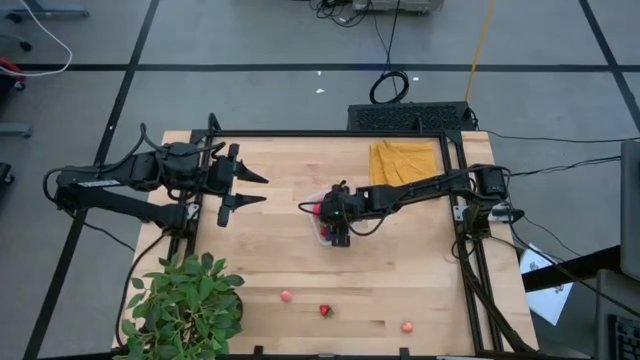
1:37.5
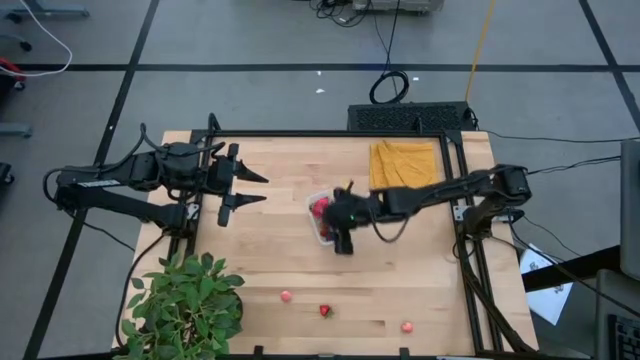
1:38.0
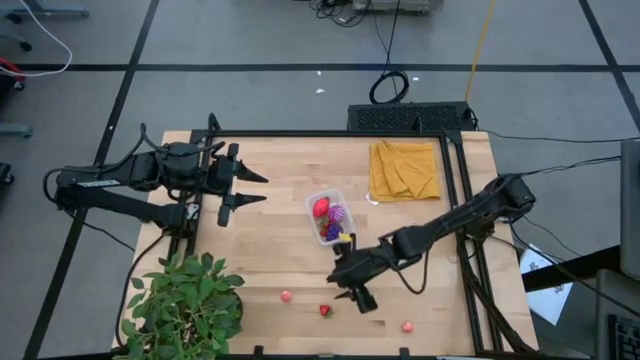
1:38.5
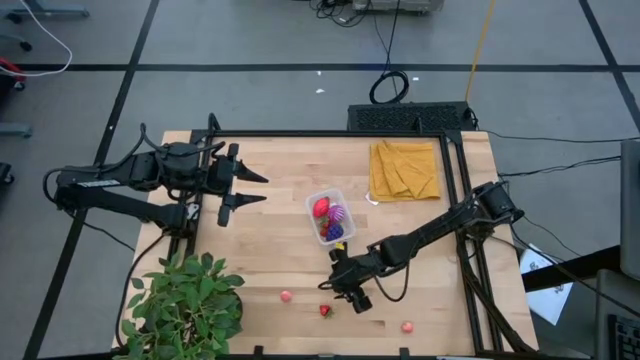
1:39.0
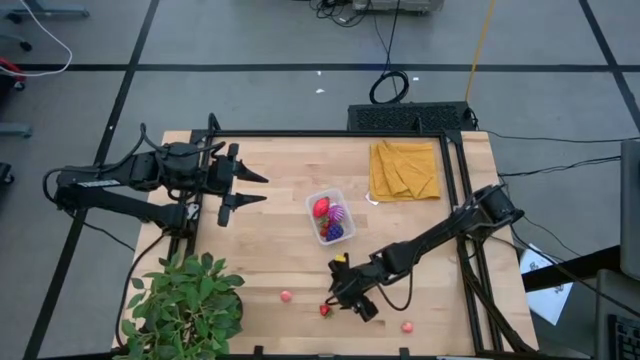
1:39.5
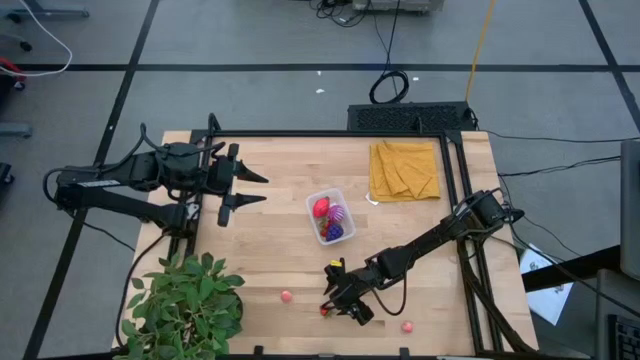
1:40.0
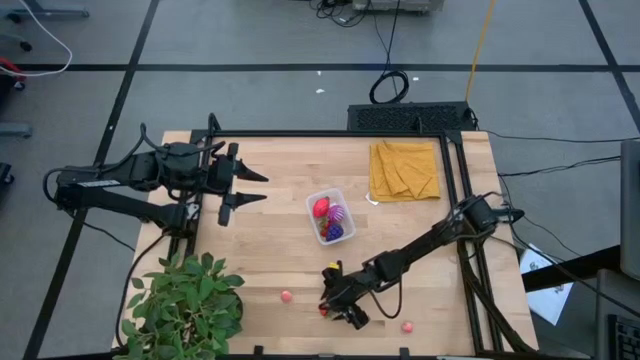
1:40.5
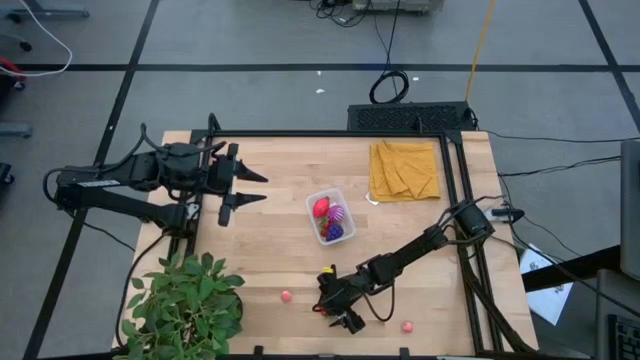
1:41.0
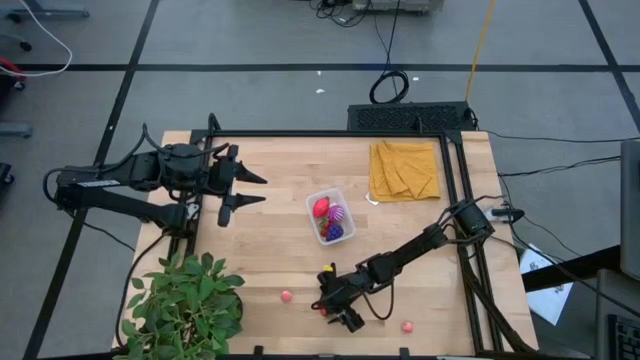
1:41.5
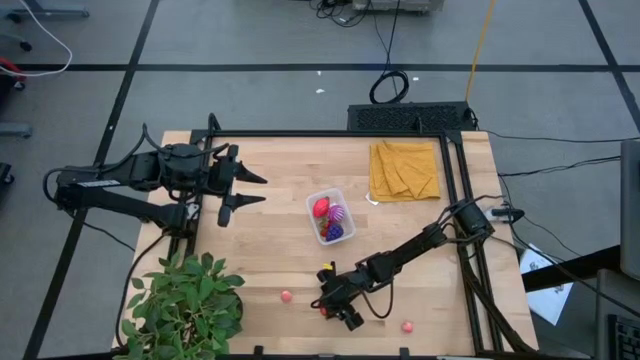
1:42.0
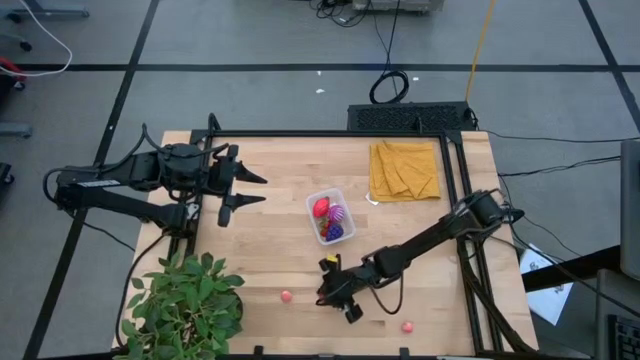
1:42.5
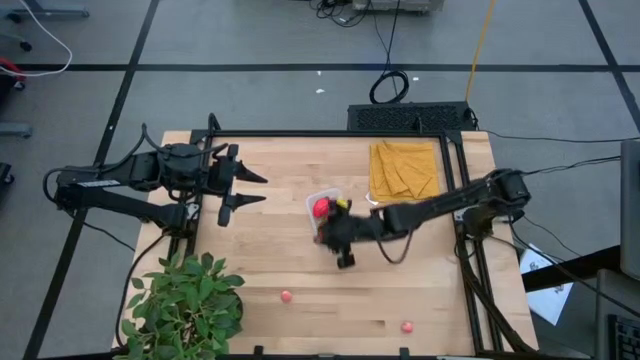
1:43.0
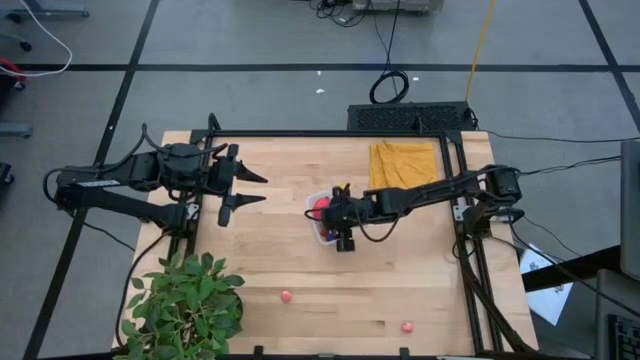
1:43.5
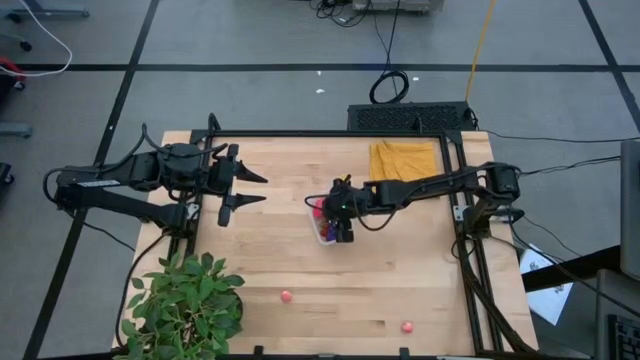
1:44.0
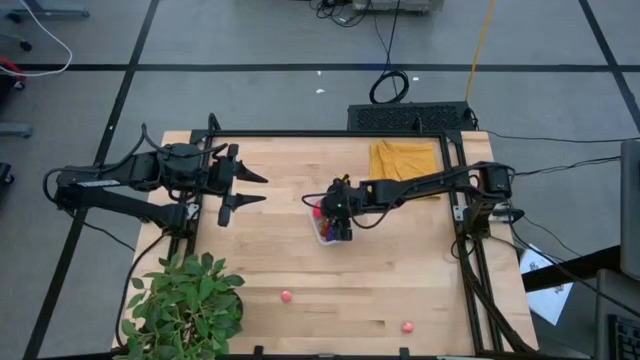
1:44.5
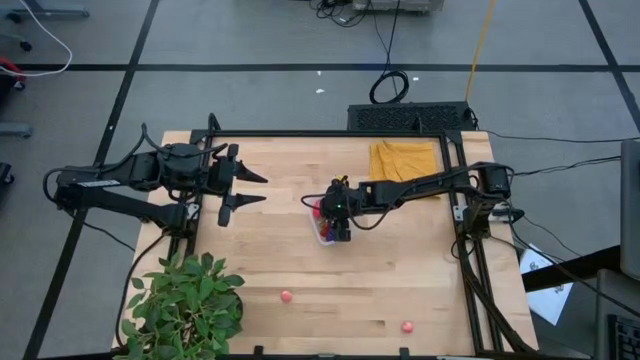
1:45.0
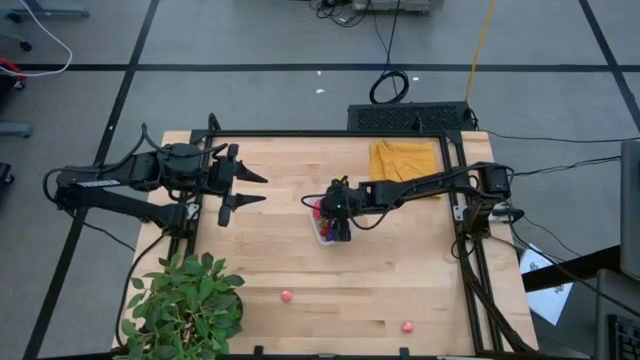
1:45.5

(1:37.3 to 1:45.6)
Task: Pick and placing Produce into tupperware
Put the red strawberry into the transparent container

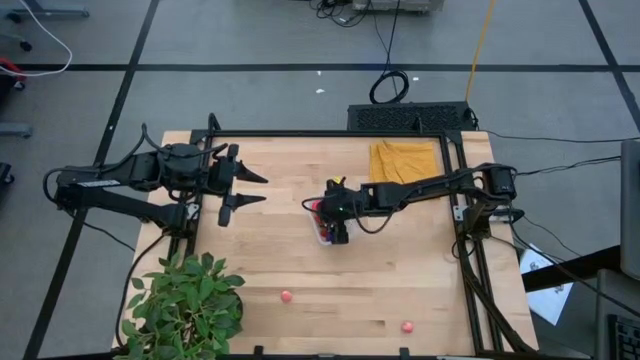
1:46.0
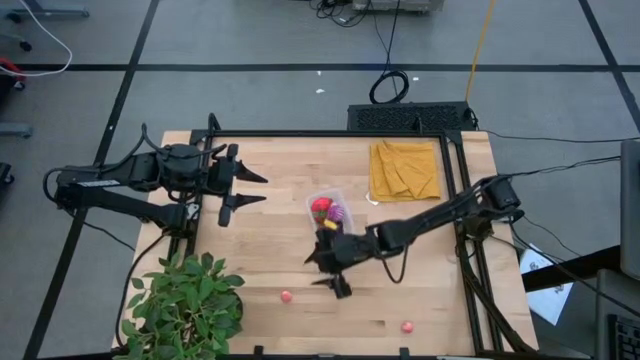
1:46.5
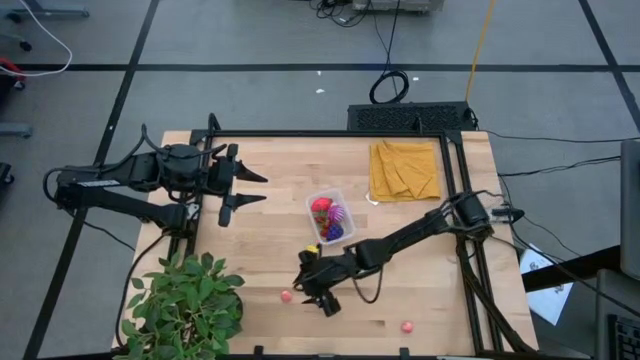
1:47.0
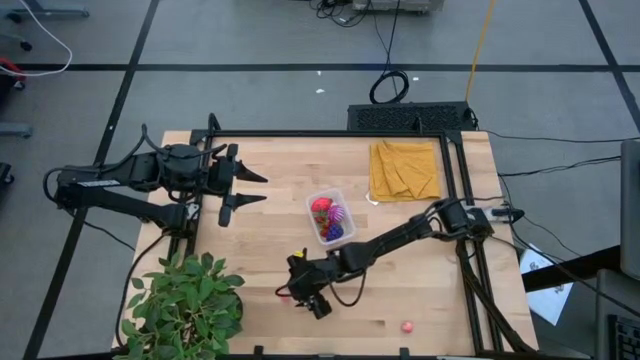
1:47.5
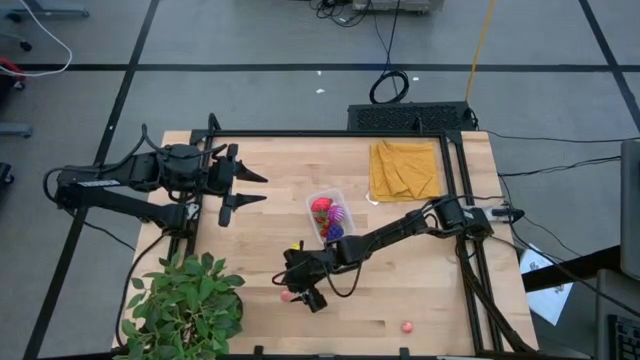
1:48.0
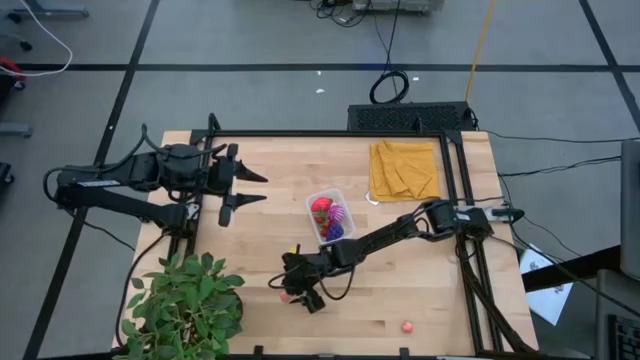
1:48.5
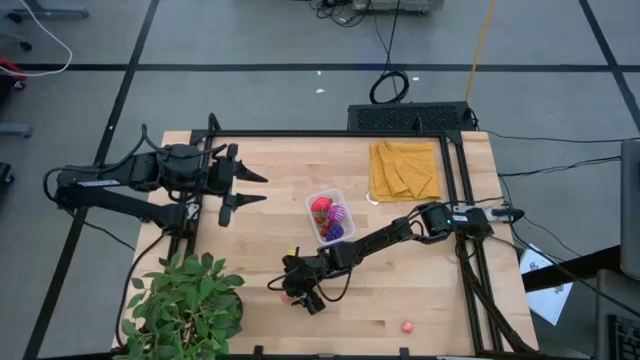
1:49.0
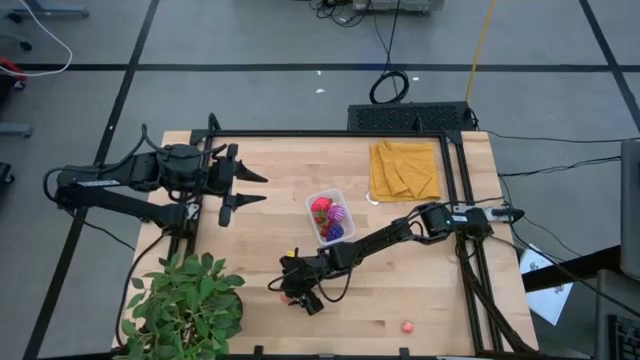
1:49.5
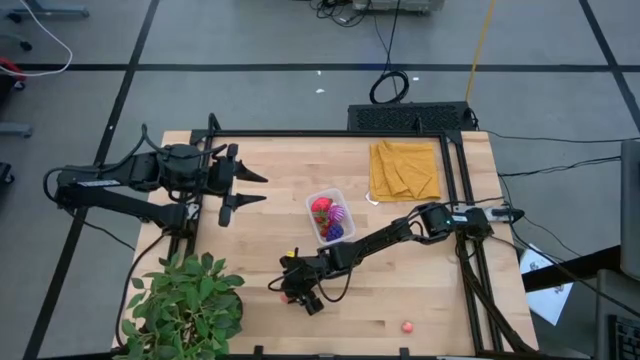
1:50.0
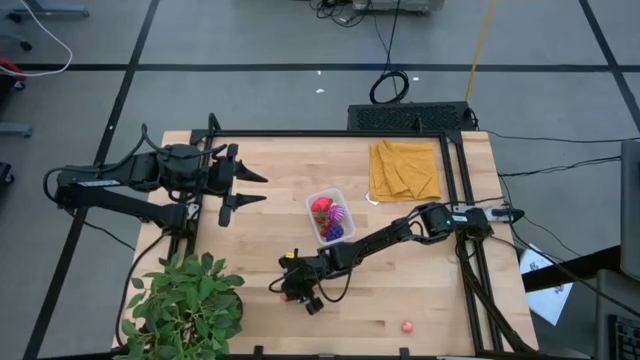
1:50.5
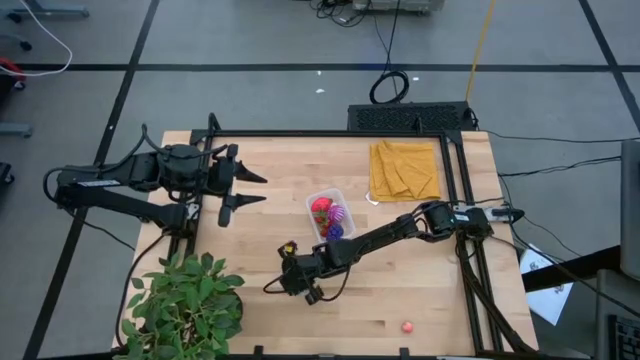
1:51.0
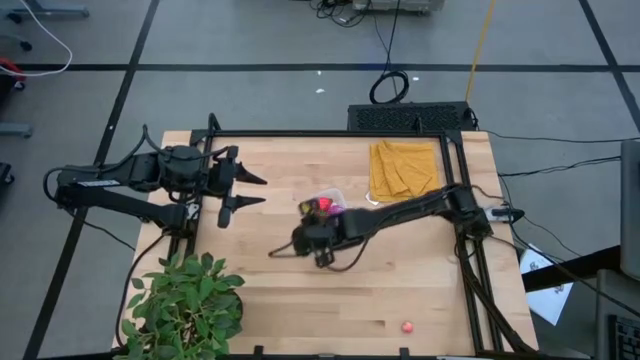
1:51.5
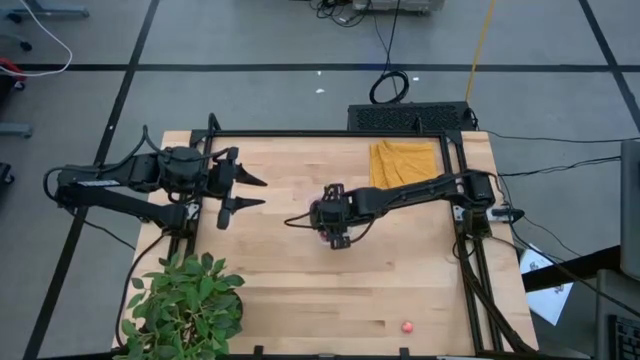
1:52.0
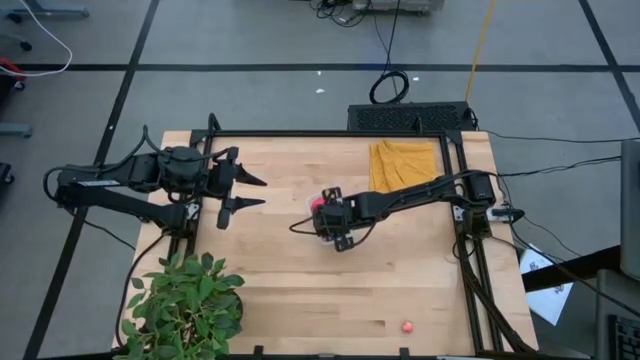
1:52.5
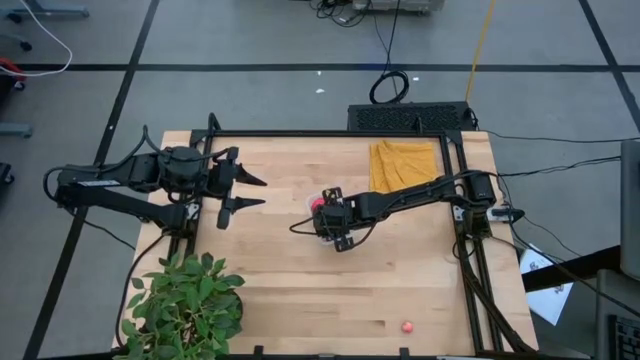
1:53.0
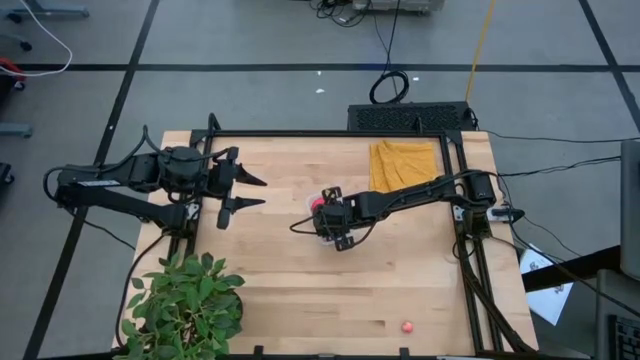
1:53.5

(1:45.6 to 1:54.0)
Put the left pink peach into the transparent container

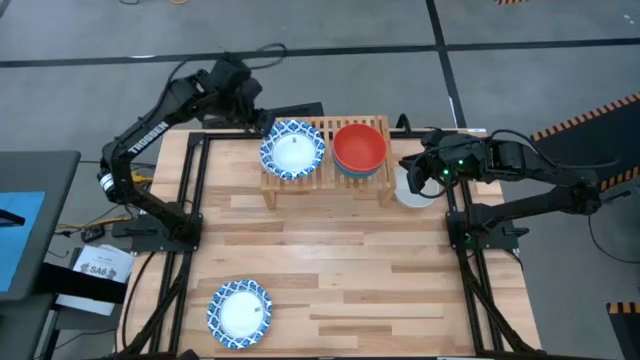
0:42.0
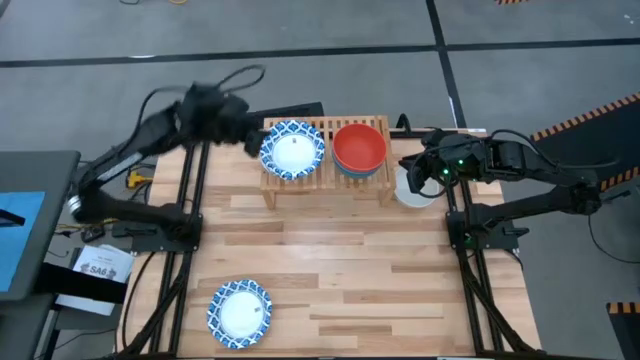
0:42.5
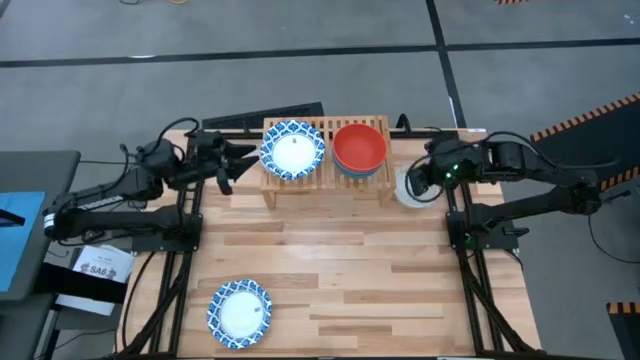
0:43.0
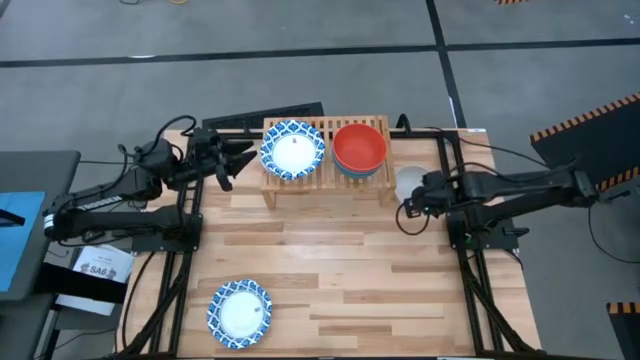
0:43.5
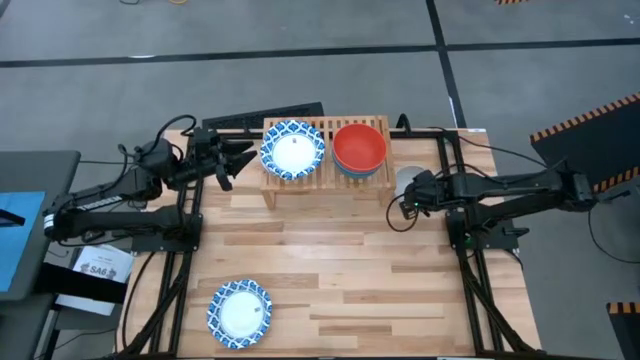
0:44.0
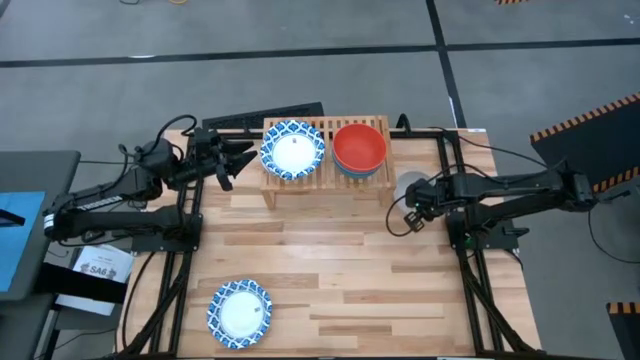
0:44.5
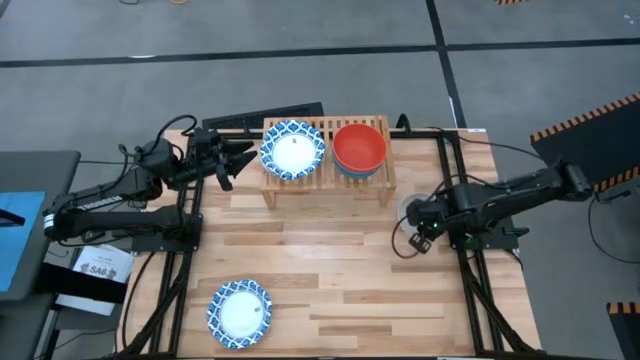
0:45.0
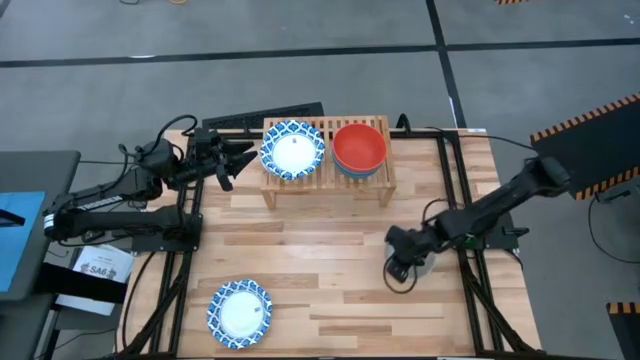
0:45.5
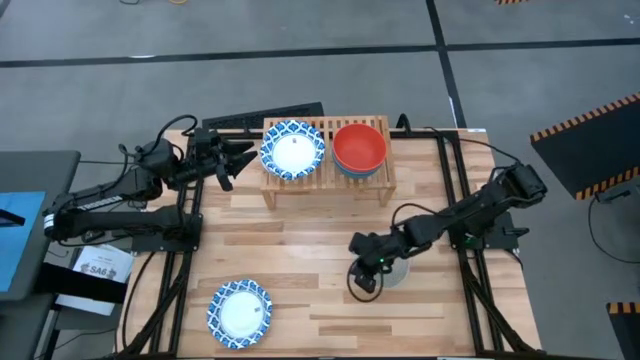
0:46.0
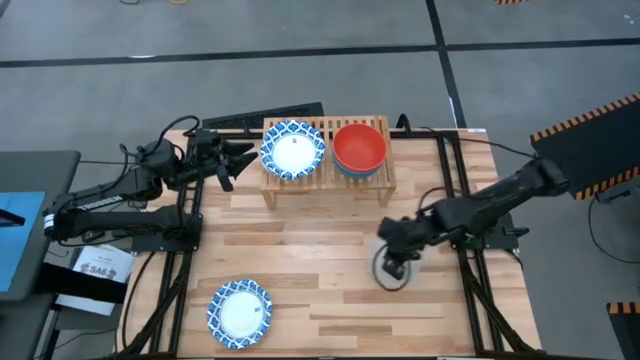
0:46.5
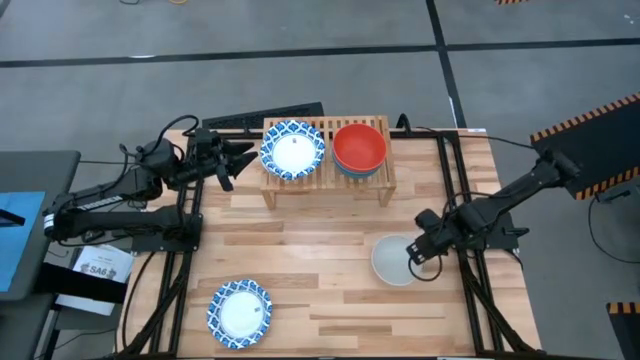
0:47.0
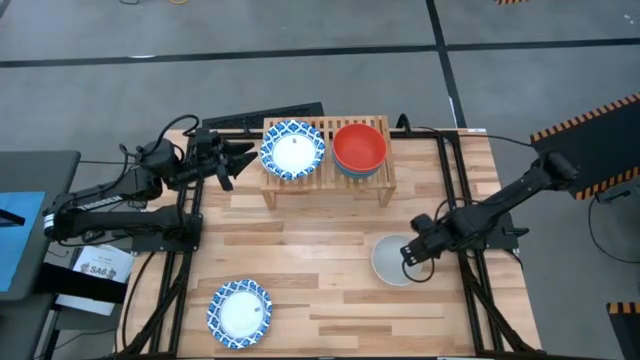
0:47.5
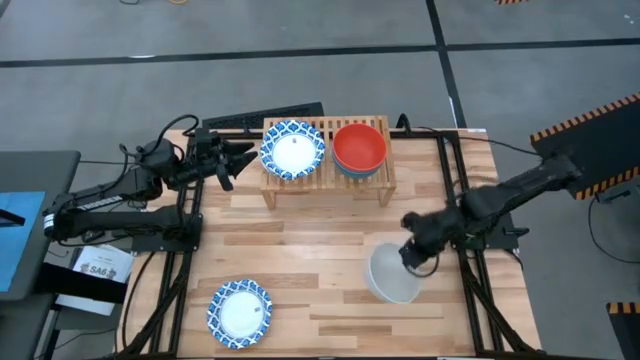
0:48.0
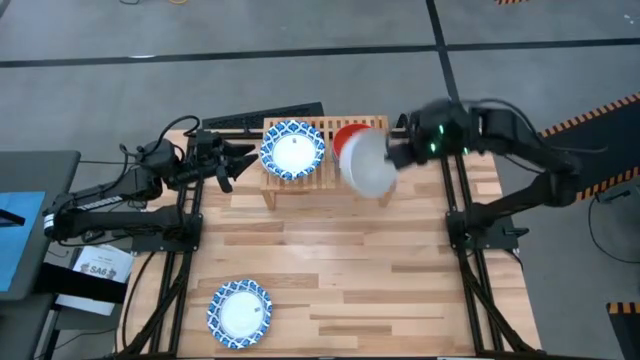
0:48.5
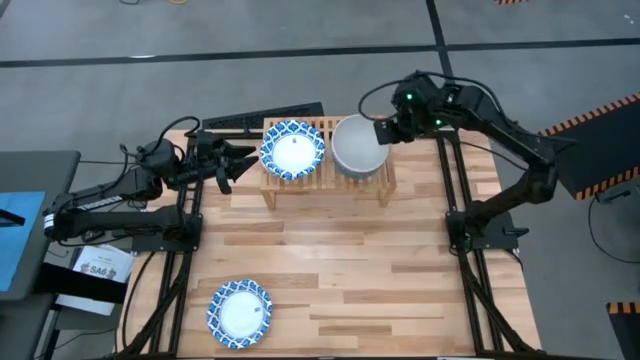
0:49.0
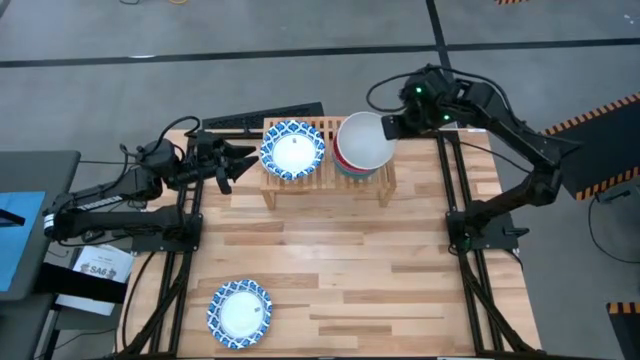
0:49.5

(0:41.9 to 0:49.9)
Task: Place and stack bowls onto a shelf
Stack the white bowl on top of the orange bowl on the shelf
